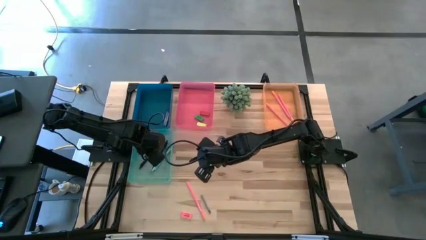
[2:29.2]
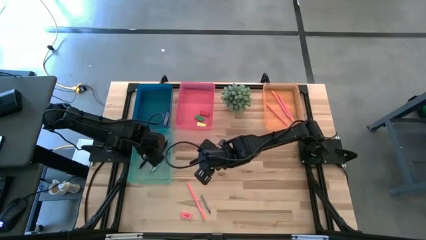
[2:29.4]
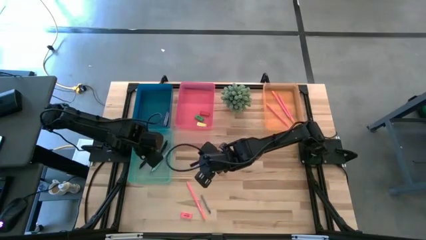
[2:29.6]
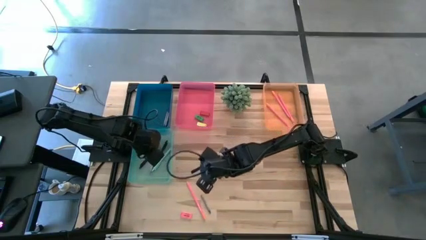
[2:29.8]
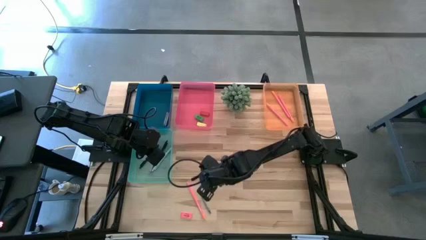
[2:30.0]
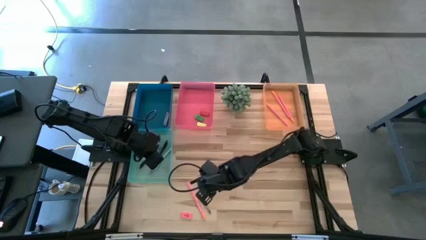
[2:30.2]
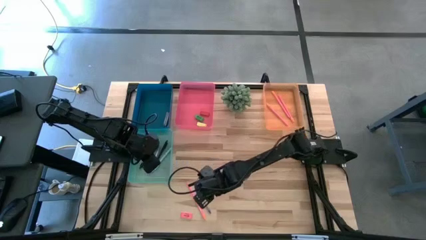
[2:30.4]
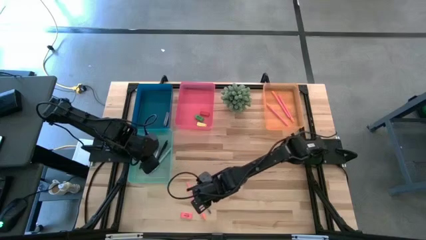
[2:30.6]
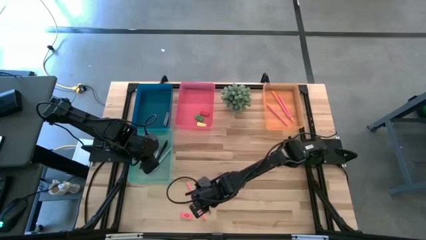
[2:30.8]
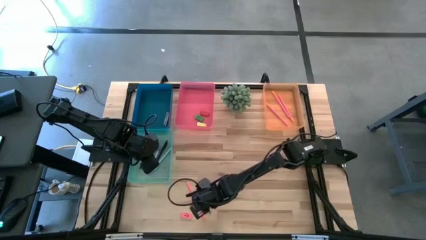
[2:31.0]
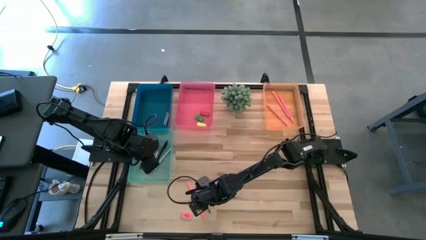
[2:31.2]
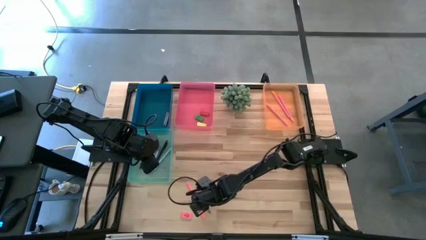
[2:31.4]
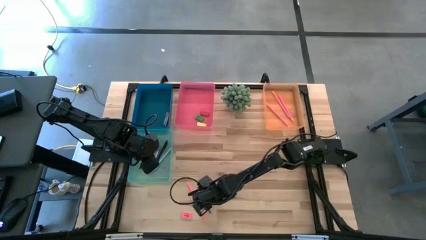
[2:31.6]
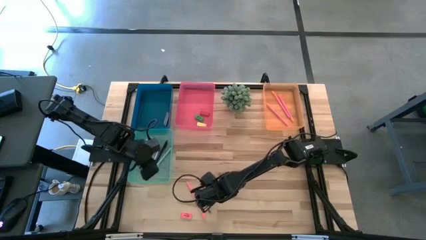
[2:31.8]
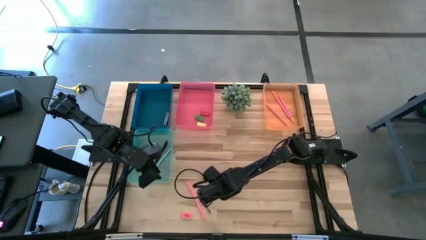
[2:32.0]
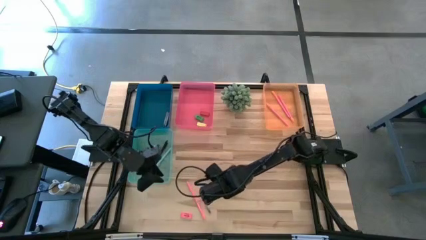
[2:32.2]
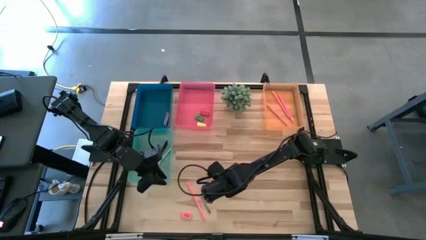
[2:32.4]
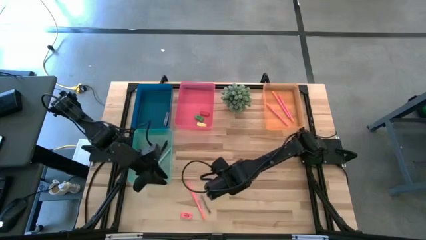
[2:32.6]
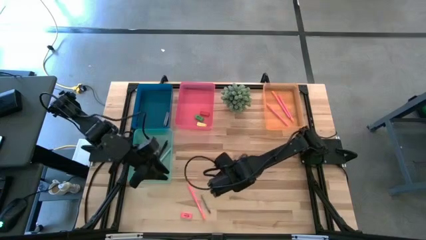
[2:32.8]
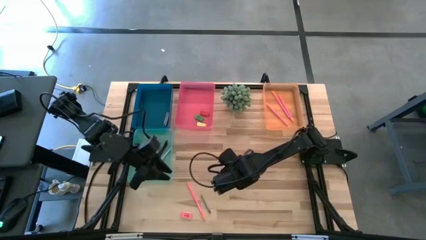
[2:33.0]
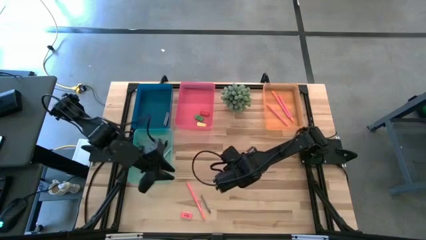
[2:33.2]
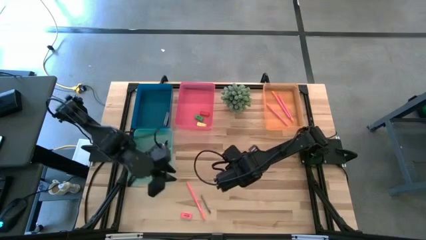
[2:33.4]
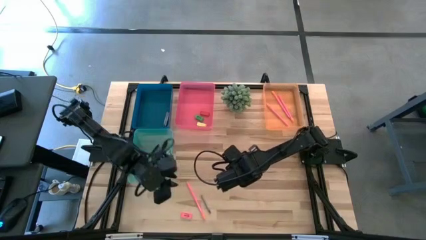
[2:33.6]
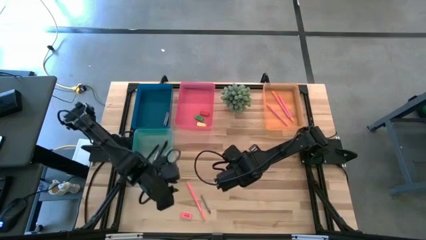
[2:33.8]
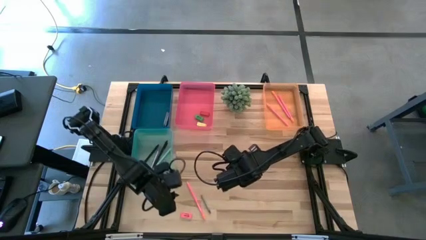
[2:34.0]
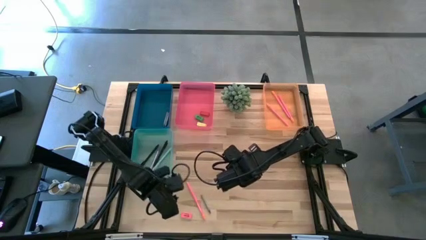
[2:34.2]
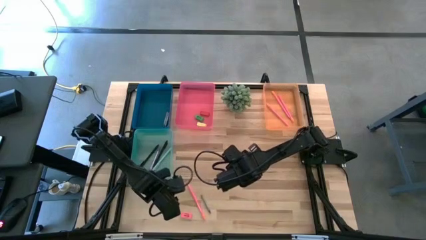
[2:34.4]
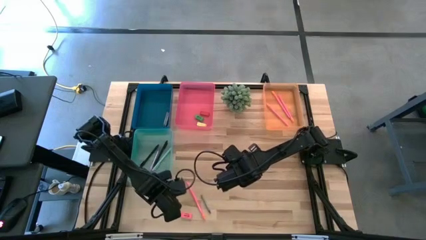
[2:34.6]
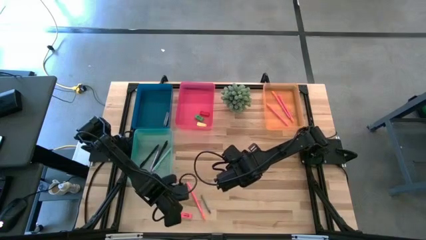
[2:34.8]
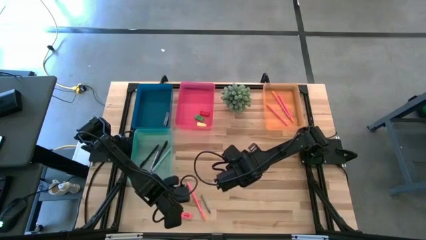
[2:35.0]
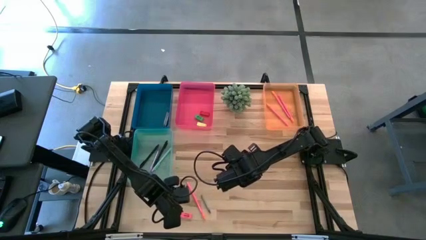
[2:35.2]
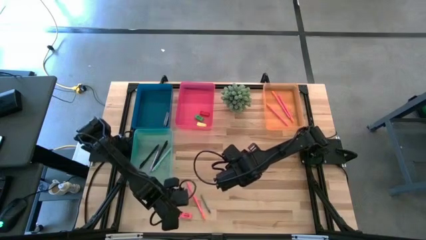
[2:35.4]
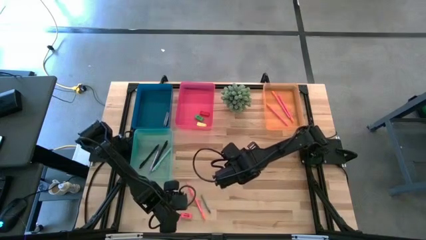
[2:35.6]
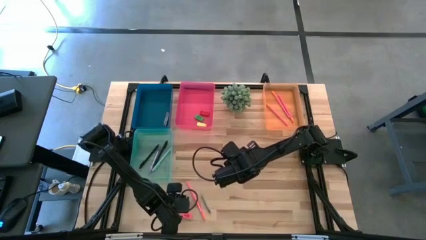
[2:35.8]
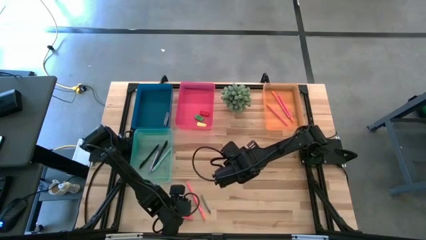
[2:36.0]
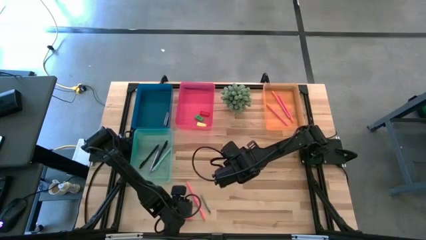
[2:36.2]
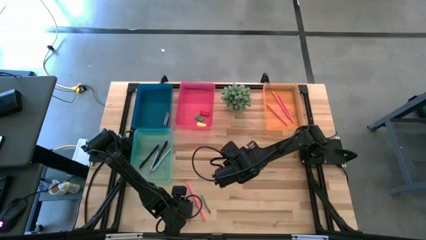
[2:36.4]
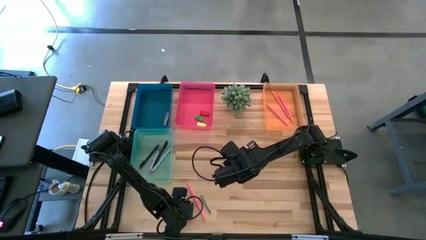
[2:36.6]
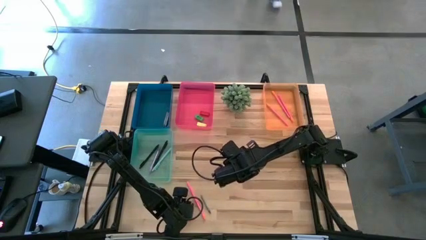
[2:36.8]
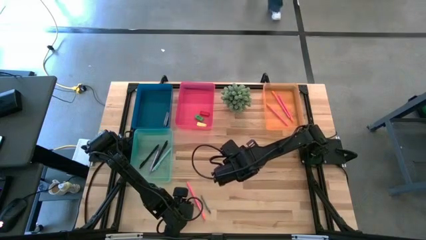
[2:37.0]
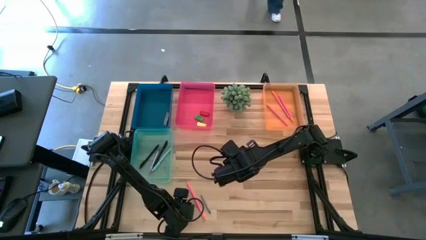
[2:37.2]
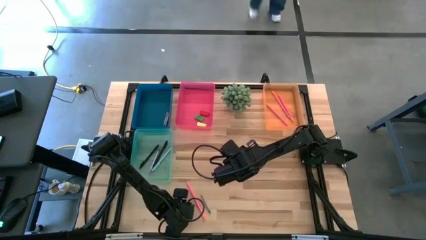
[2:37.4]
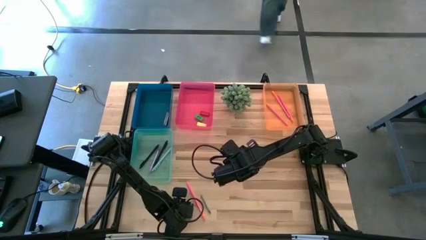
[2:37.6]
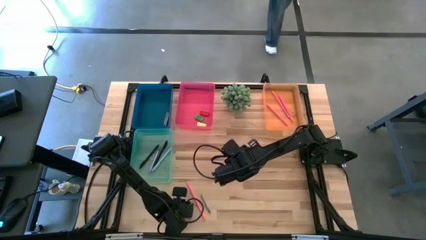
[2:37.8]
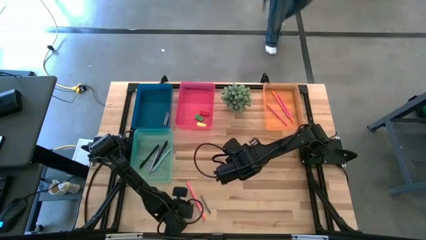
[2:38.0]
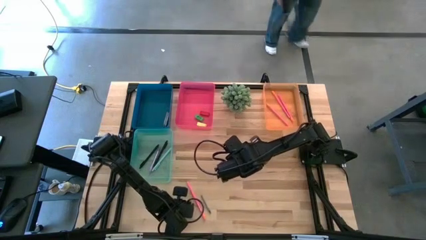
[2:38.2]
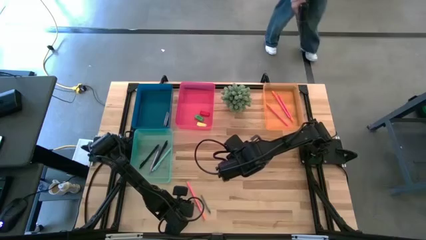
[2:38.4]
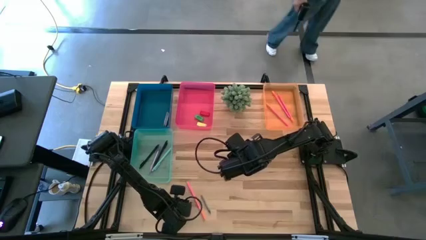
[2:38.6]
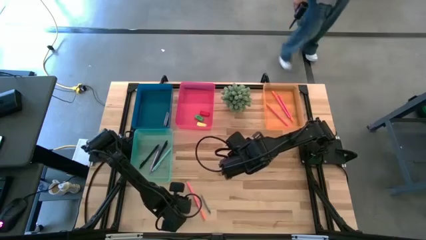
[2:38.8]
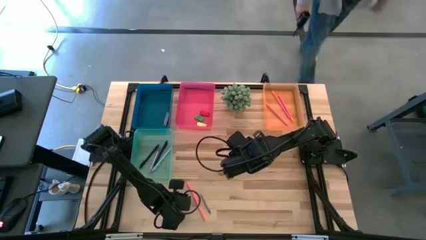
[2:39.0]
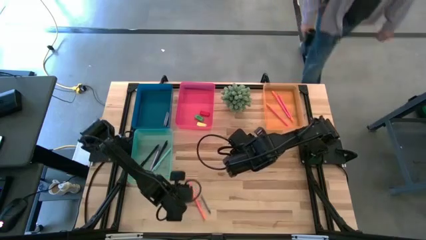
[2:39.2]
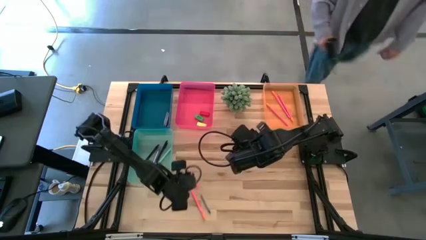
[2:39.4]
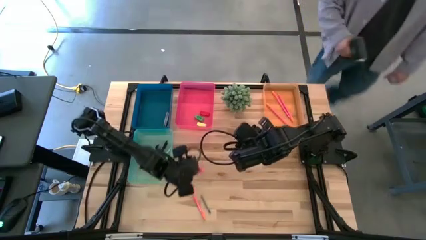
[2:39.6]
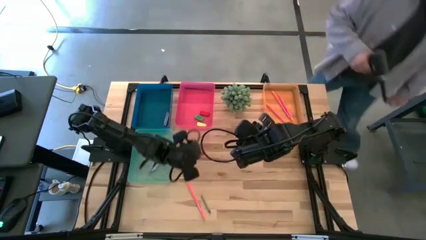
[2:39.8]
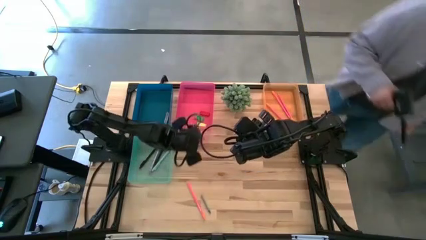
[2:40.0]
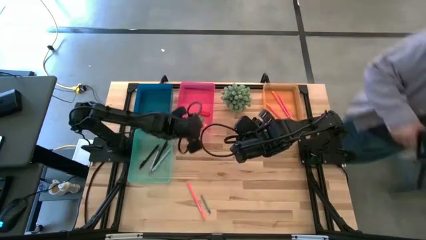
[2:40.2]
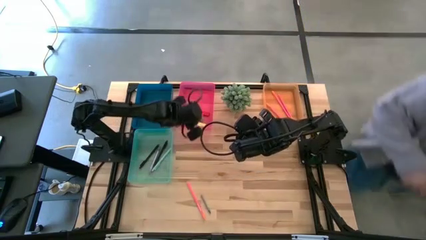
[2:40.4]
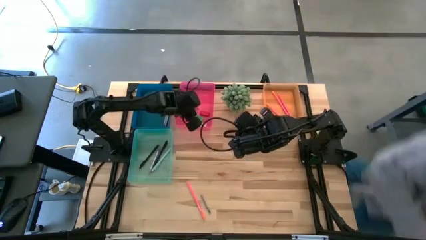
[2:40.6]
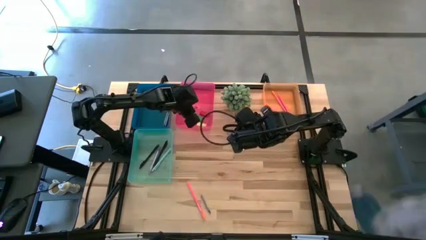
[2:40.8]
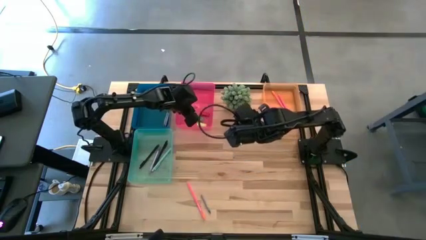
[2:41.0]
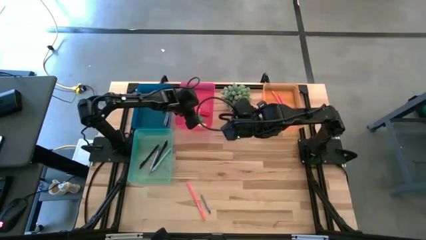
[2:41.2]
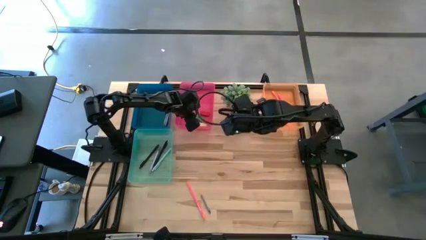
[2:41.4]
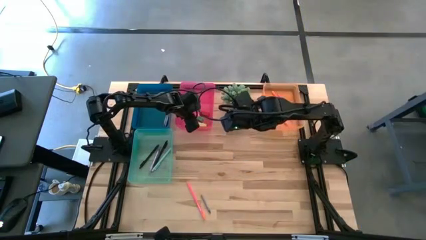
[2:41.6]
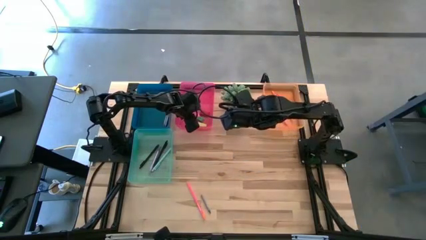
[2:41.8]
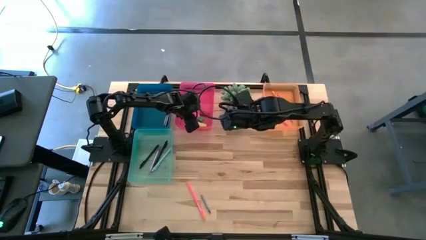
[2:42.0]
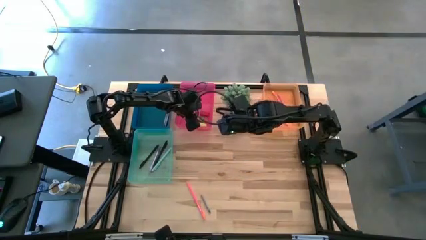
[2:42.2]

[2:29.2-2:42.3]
Task: Sort crayons/erasers/pens/pencils in bins
Put the pink eraser into the pink bin

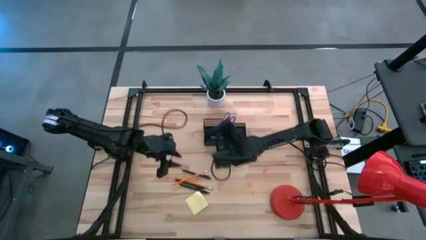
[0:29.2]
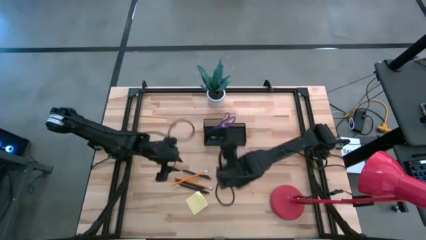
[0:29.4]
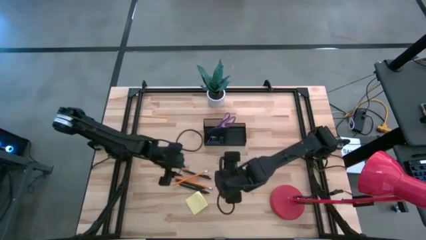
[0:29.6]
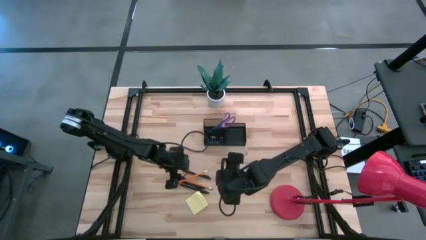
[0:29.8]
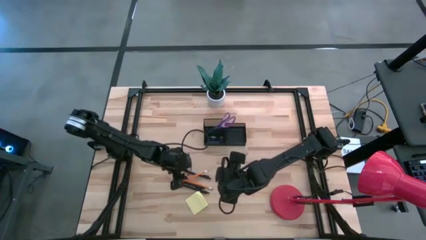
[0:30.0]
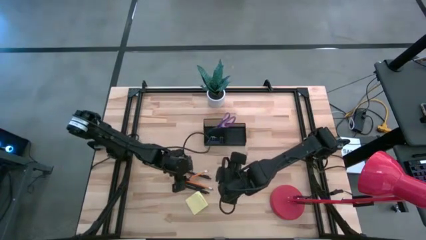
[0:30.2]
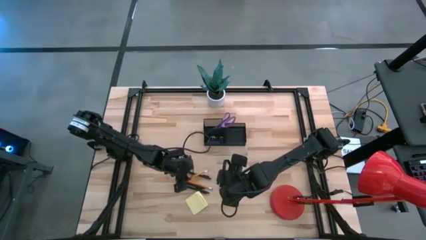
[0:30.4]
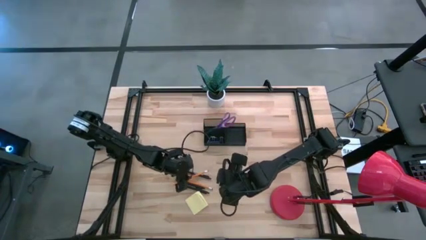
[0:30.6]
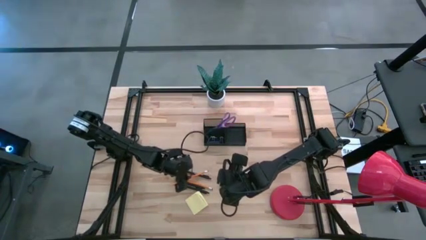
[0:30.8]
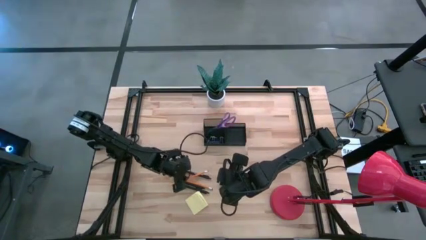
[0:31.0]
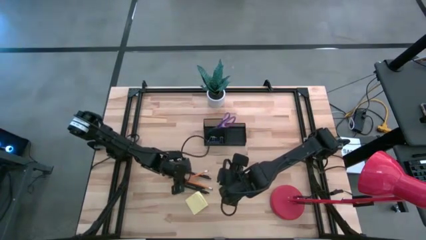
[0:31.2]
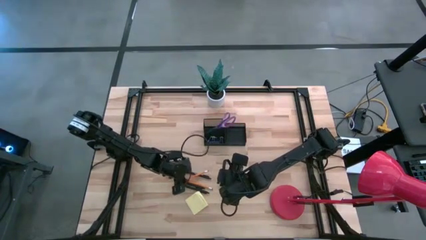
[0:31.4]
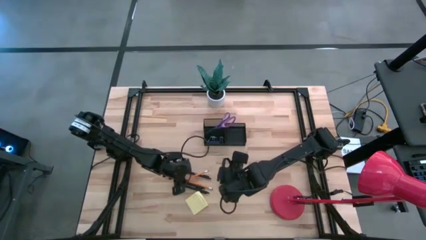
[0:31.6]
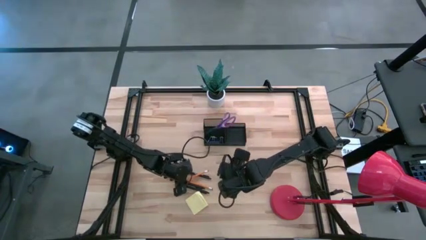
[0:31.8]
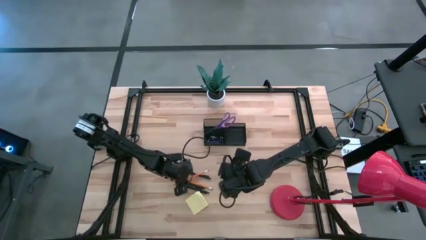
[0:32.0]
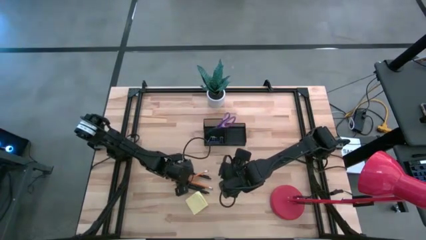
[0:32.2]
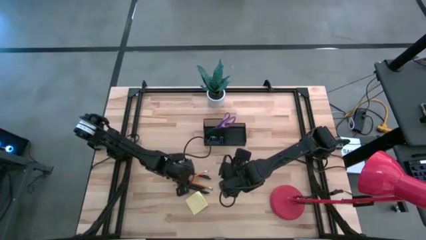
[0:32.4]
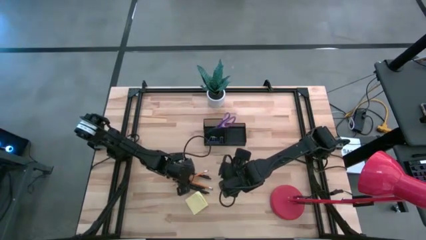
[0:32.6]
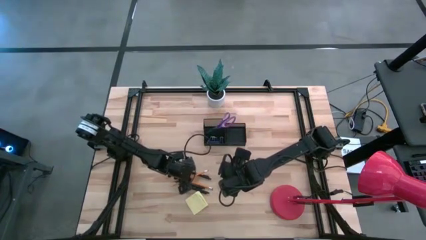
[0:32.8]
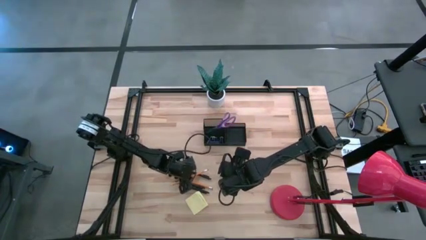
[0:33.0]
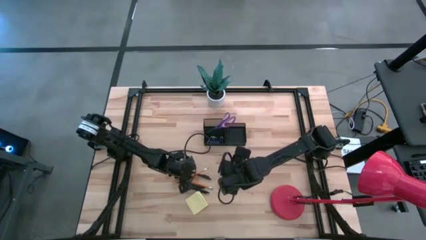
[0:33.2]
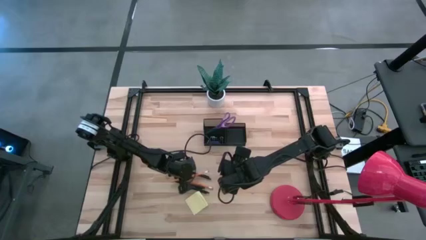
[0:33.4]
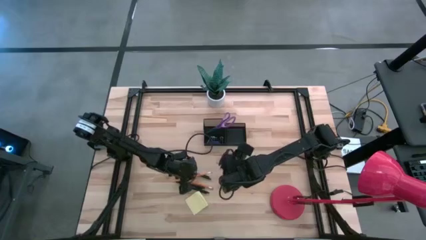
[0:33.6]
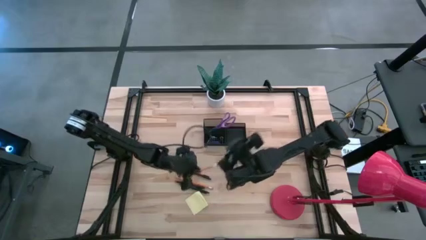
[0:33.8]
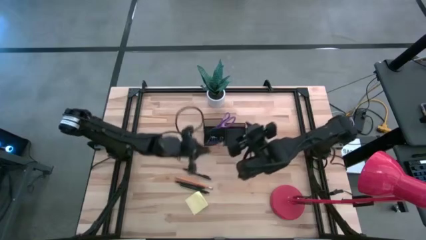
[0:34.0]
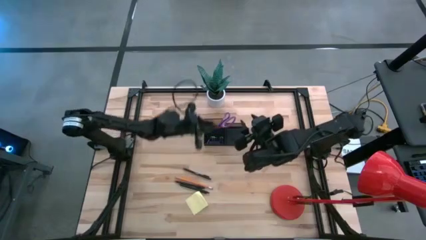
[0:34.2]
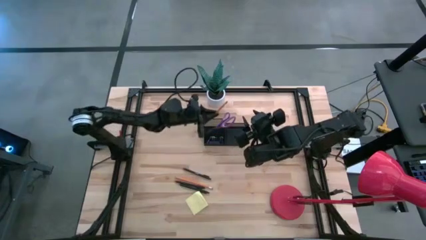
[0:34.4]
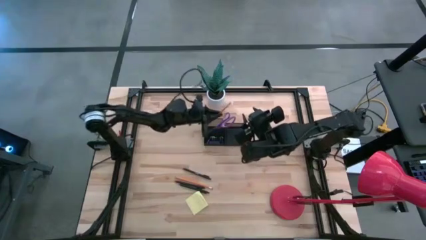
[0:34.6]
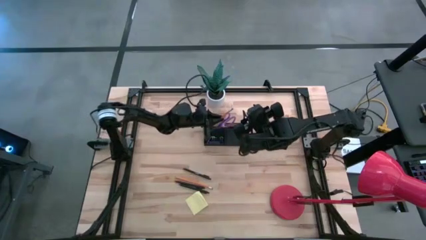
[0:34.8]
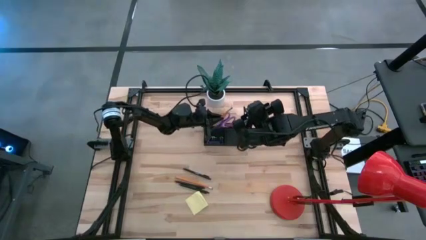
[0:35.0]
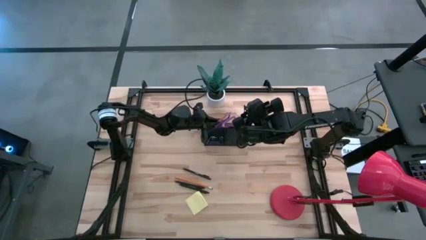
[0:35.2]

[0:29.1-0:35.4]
Task: Pick and place office supplies into organizer
Put the top orange pencil into the black organizer
